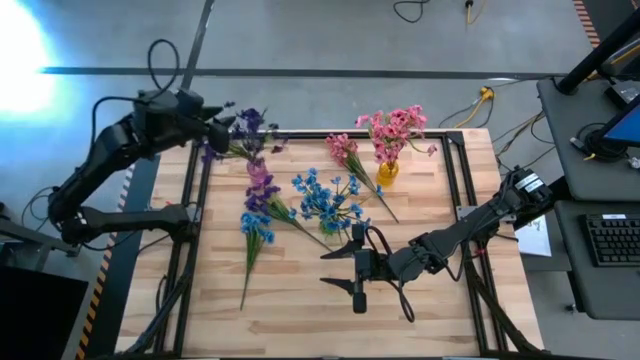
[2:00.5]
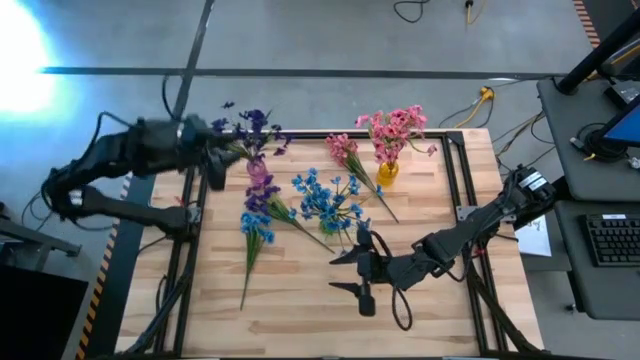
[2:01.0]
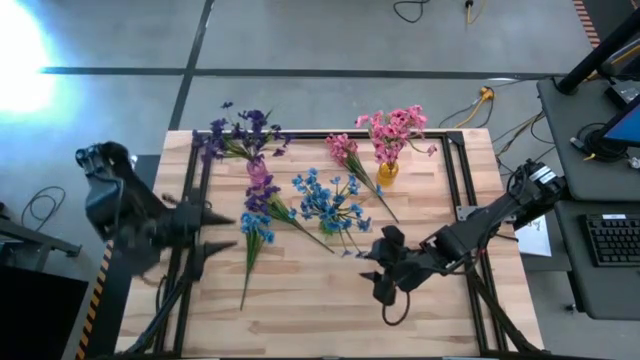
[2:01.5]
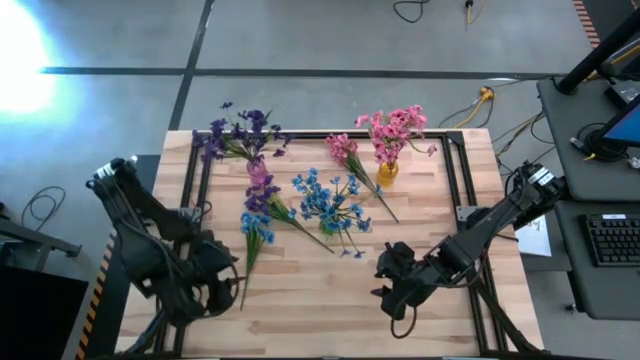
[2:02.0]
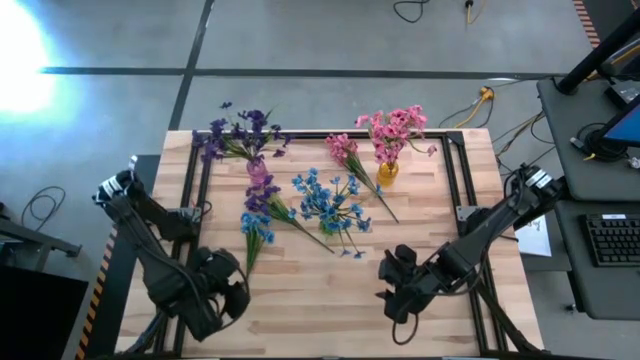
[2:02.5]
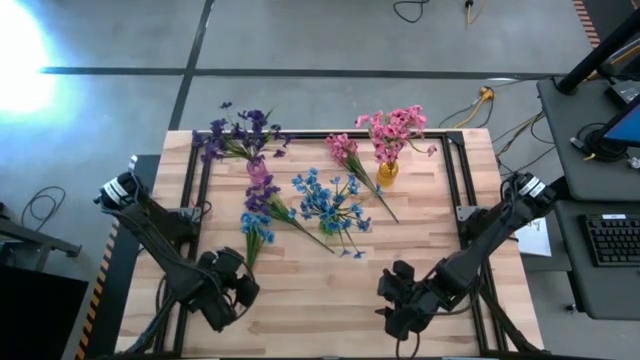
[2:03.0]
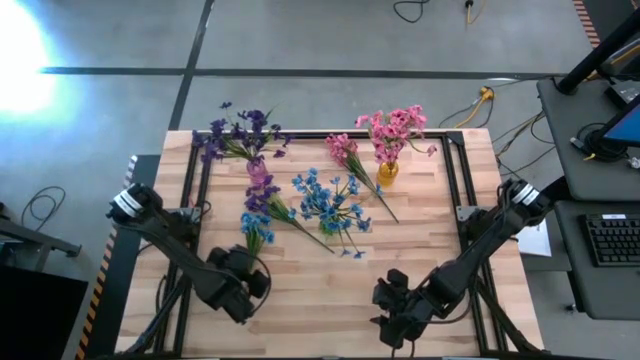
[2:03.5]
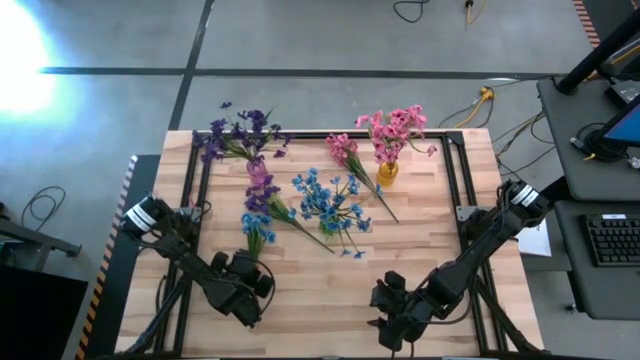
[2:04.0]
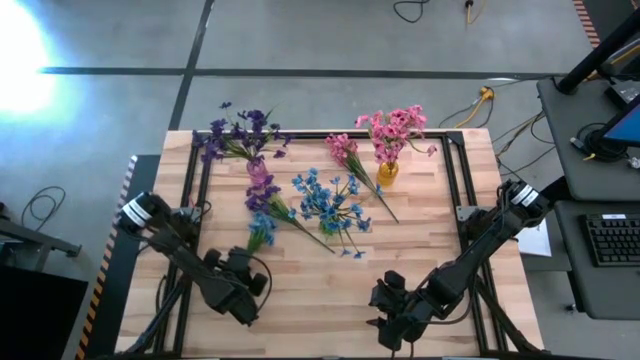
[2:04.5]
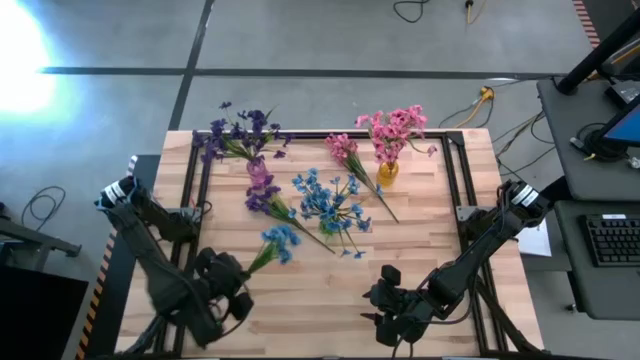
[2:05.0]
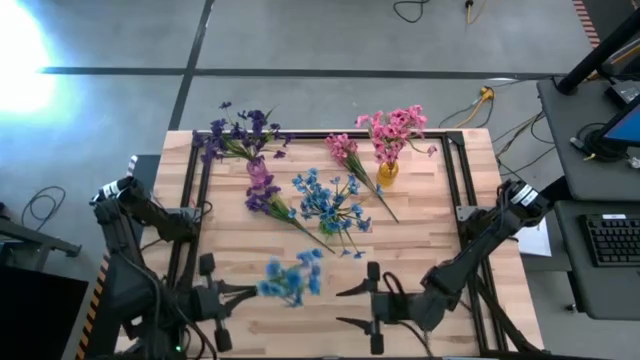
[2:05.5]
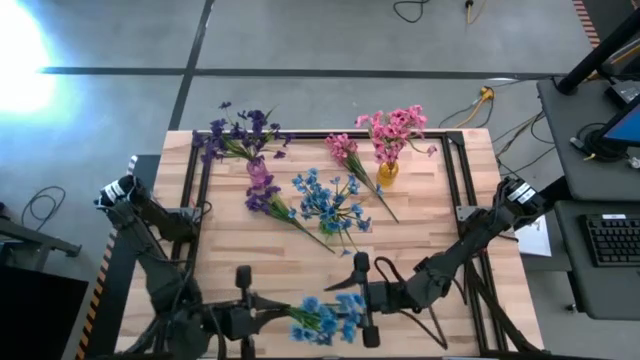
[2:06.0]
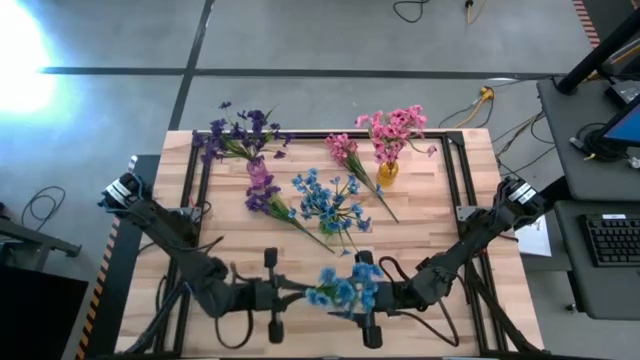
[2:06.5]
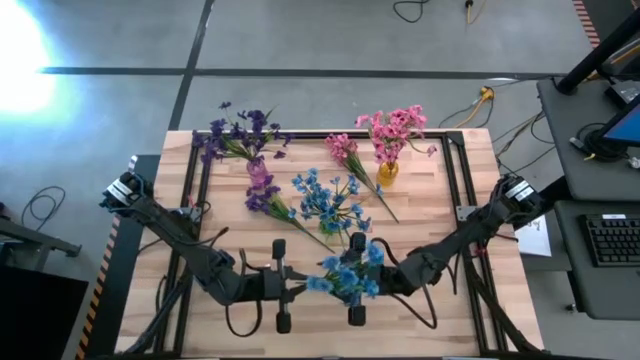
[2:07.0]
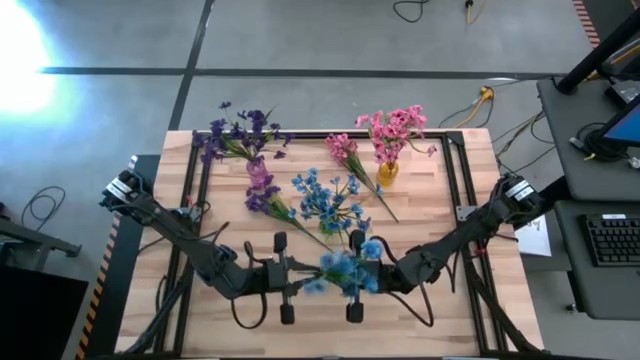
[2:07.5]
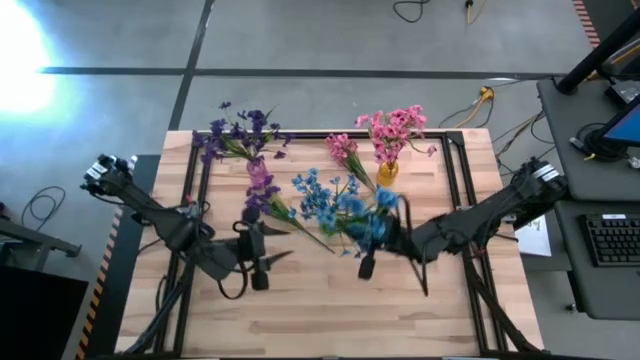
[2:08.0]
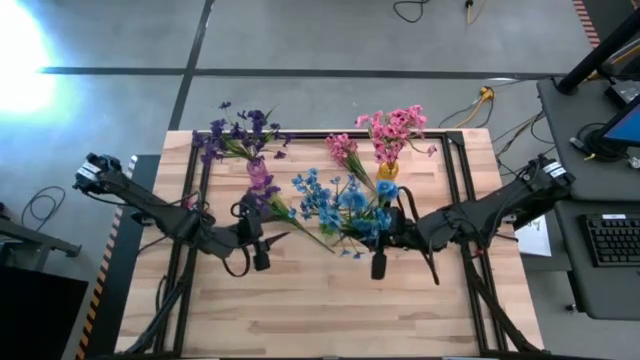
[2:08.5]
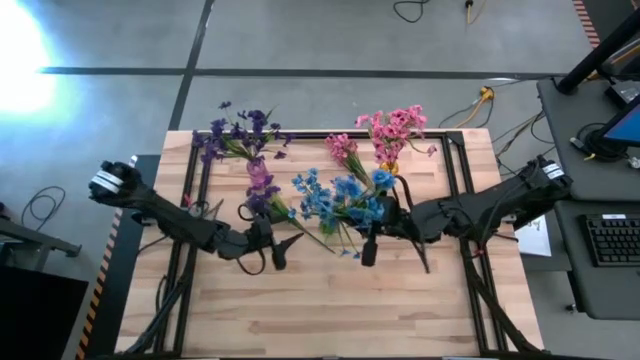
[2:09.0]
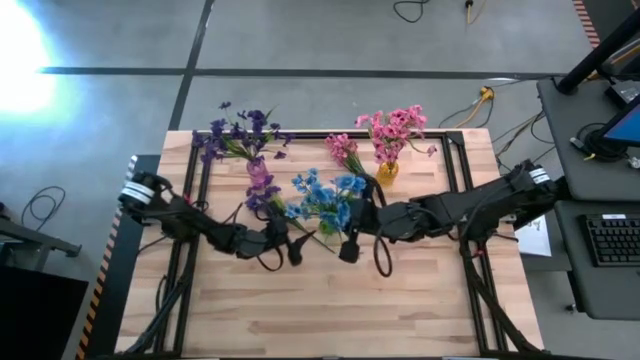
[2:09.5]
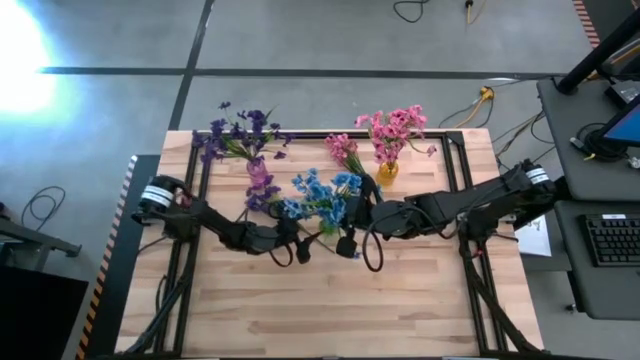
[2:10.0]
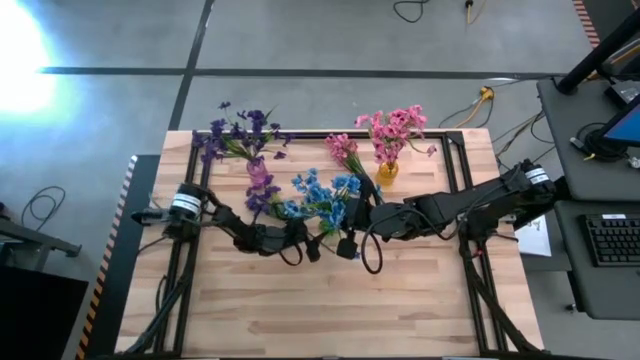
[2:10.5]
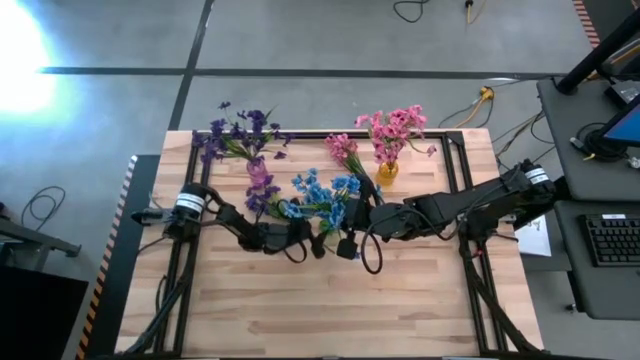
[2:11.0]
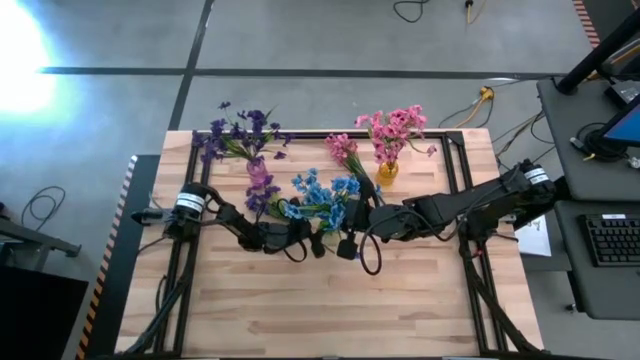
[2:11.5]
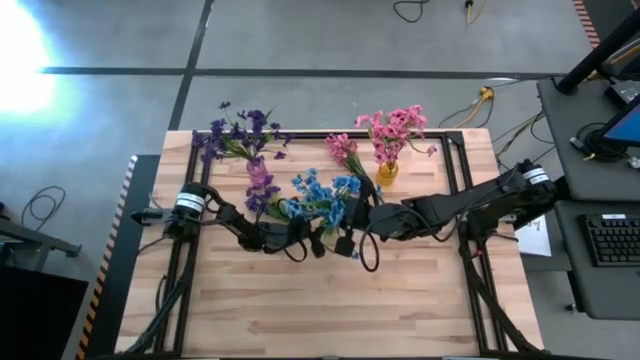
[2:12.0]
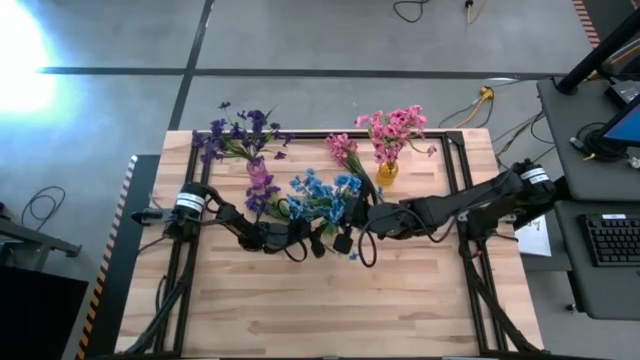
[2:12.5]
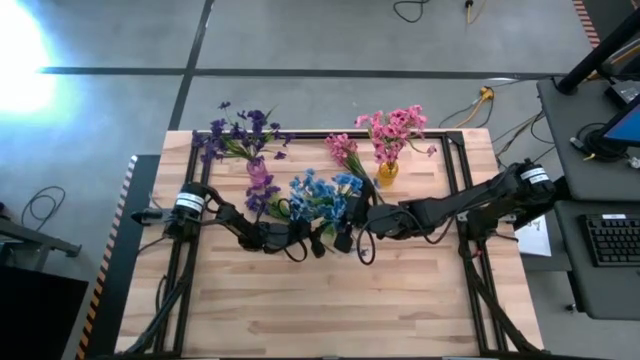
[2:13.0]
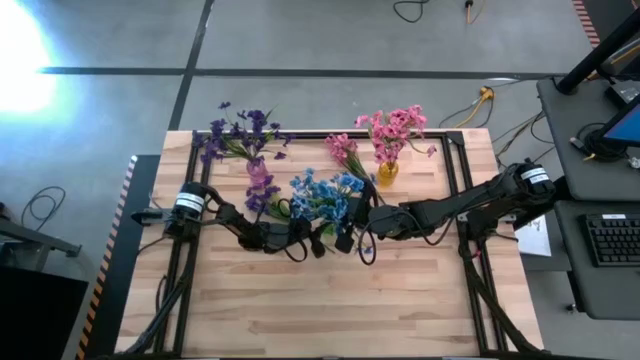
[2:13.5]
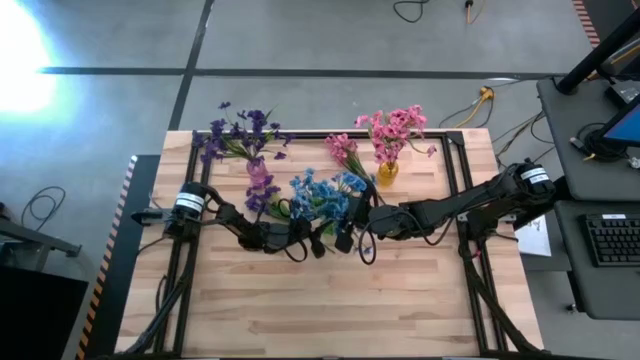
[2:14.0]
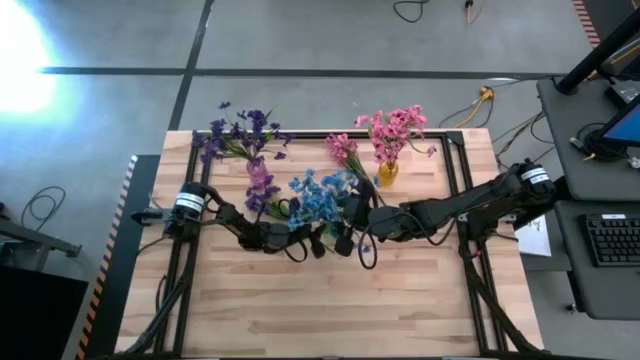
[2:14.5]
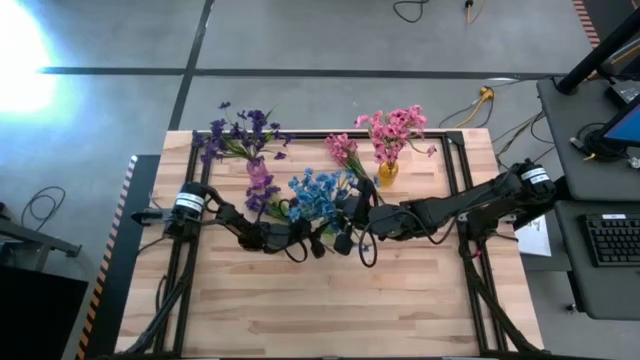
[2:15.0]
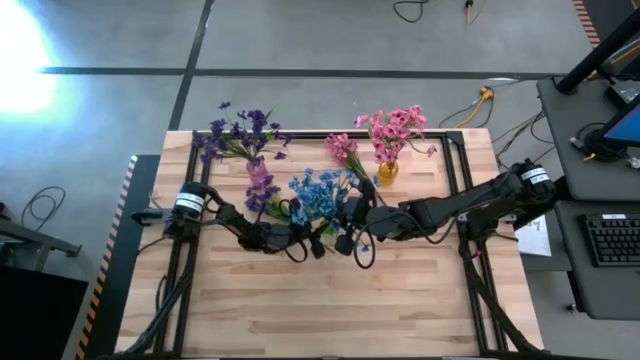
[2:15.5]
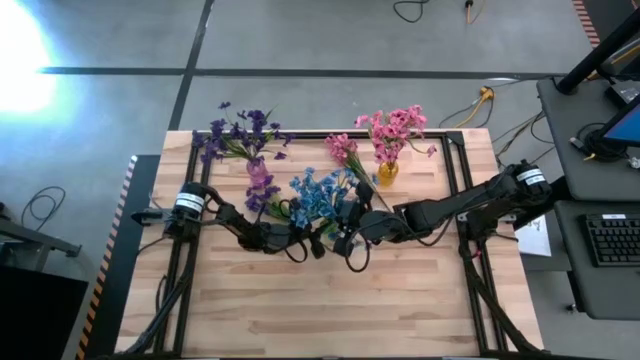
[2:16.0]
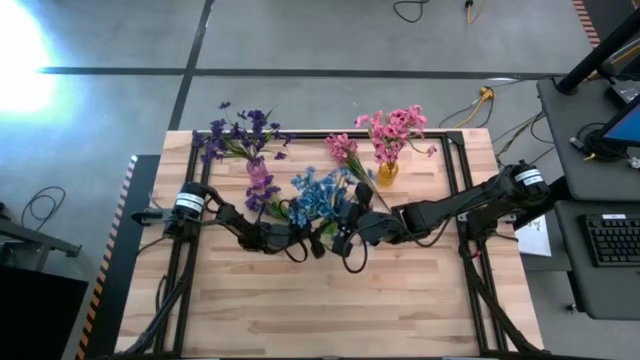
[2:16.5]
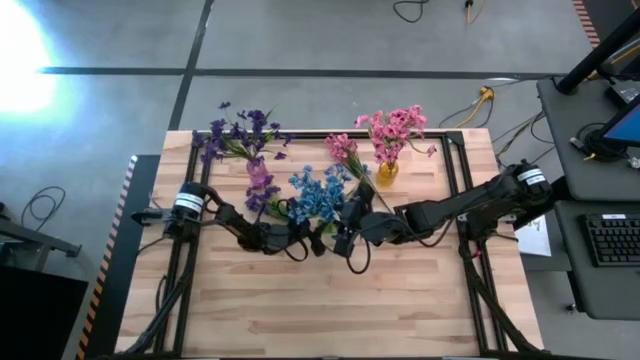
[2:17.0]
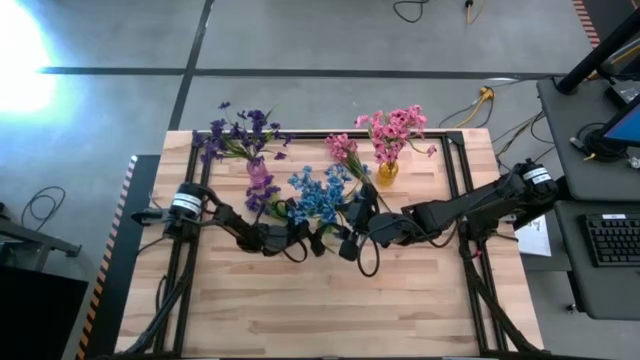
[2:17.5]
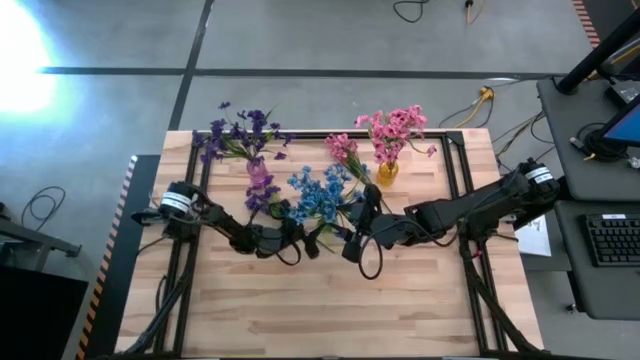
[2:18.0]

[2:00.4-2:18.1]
Task: Sort flowers into vase by color
Put the blue flowers into the green vase

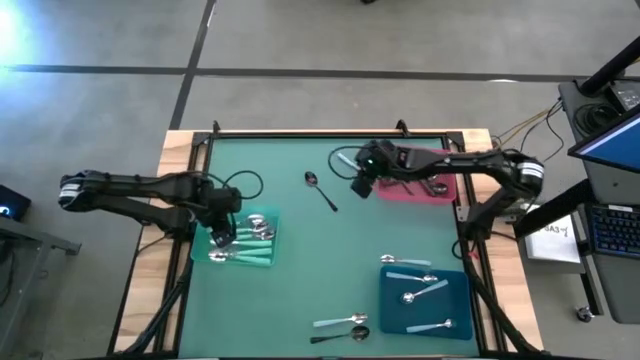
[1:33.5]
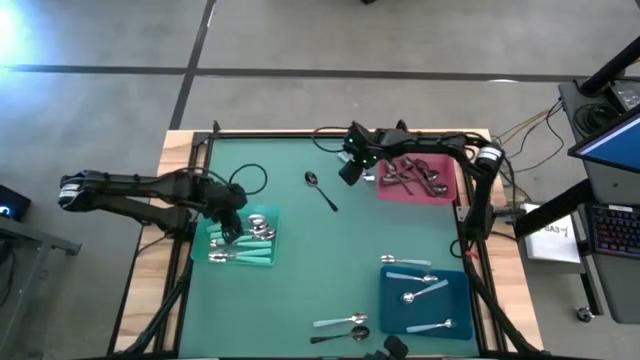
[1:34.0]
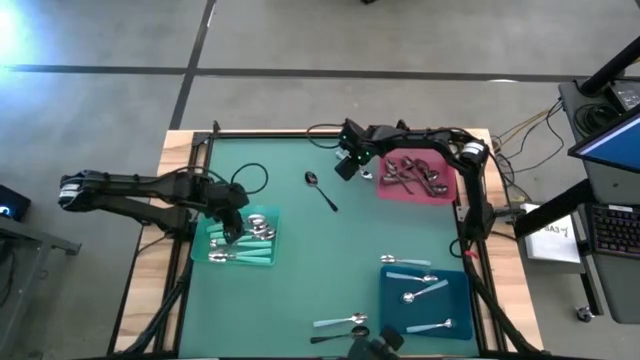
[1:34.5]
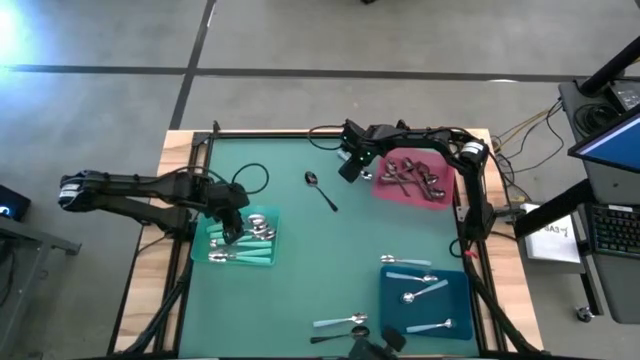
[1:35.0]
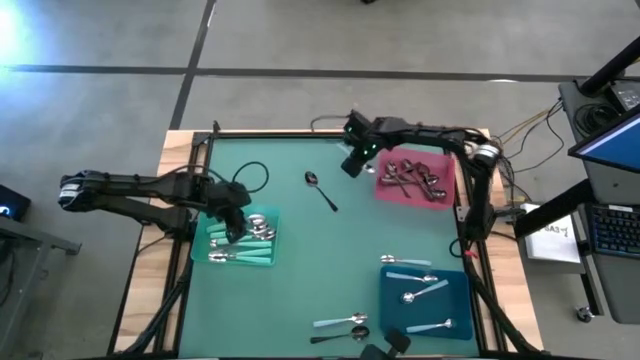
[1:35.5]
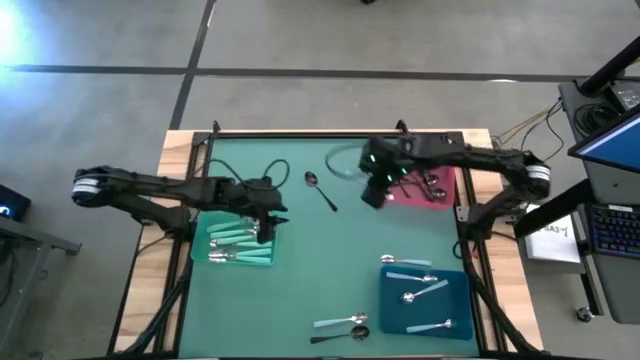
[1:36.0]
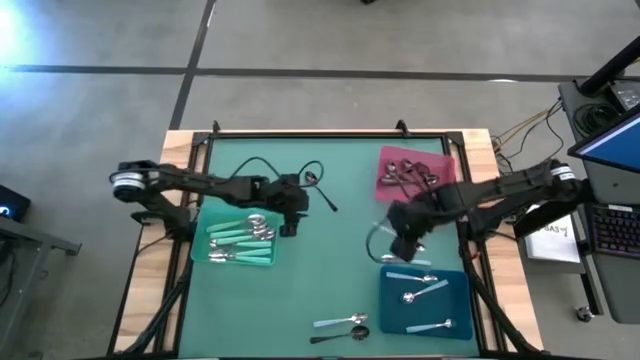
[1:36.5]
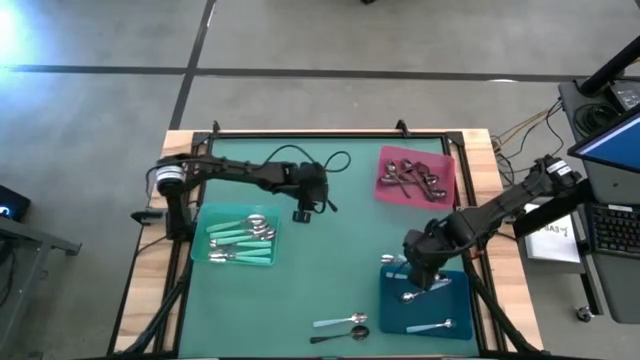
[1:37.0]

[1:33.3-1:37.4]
Task: Sort silverware by color (type)
Put the blue spoon into the blue bin

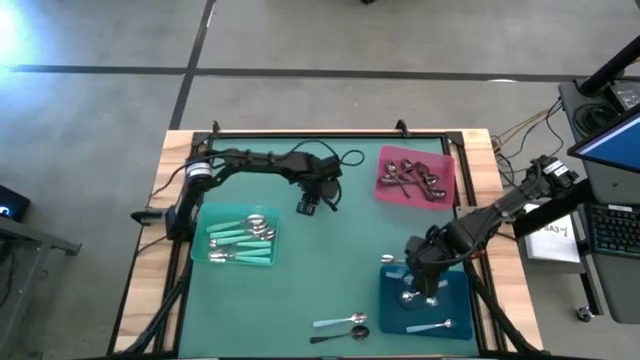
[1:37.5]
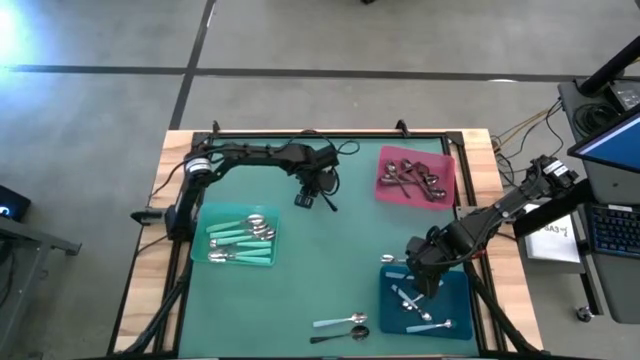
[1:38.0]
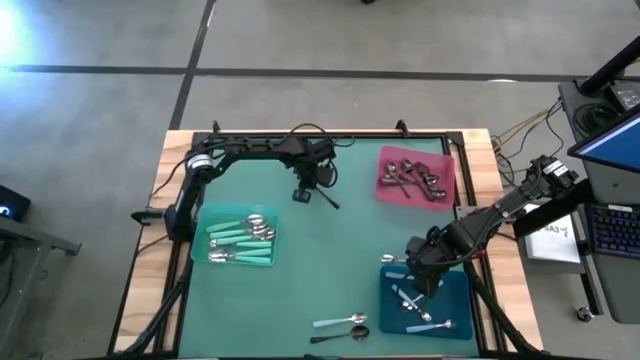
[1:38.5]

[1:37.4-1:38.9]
Put the black spoon into the red bin
